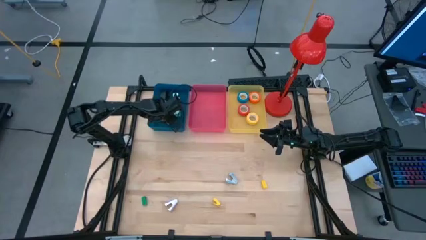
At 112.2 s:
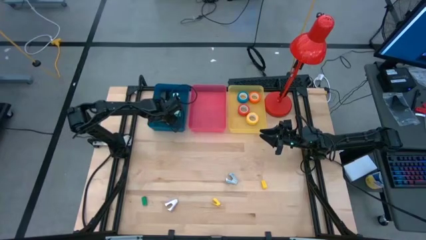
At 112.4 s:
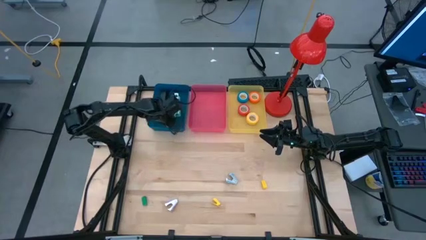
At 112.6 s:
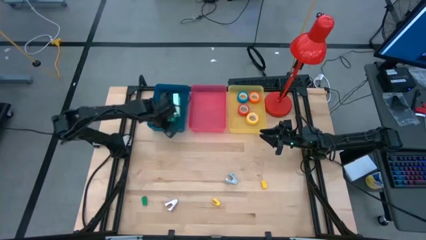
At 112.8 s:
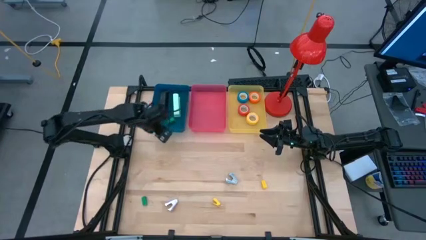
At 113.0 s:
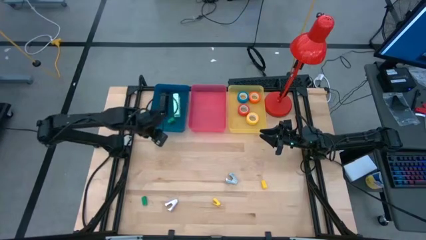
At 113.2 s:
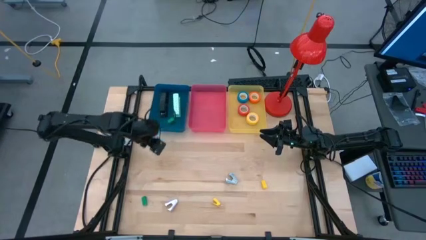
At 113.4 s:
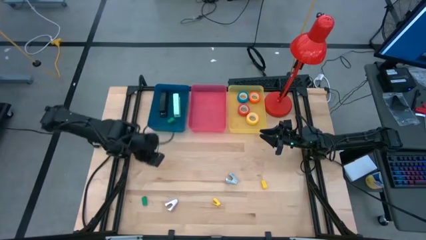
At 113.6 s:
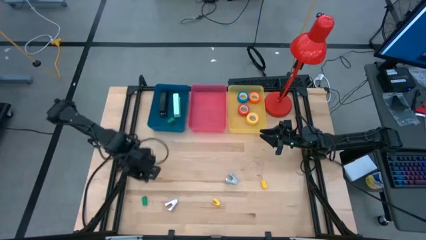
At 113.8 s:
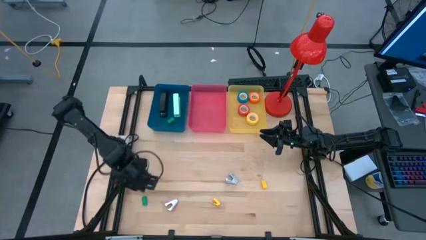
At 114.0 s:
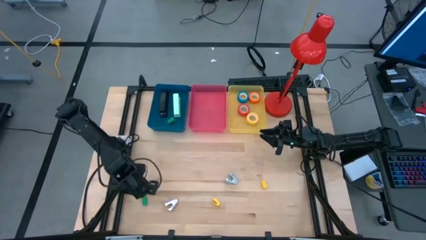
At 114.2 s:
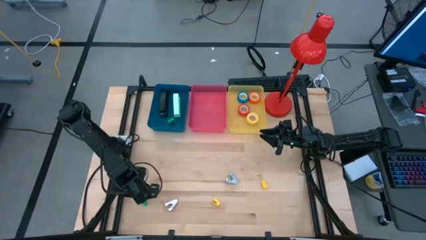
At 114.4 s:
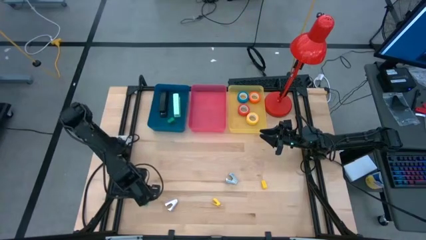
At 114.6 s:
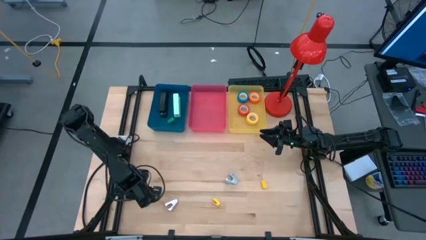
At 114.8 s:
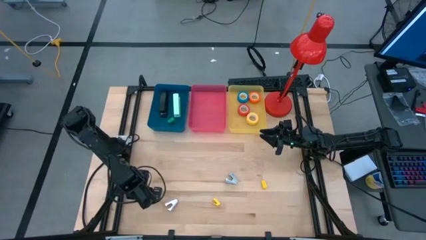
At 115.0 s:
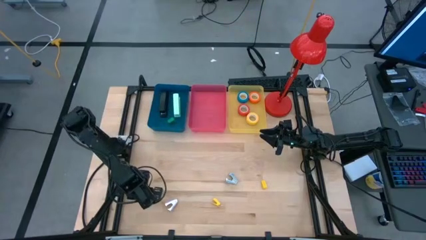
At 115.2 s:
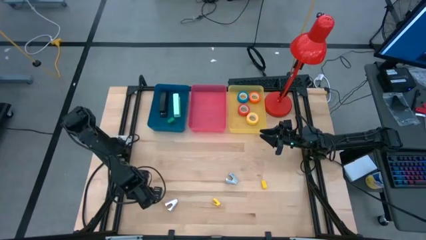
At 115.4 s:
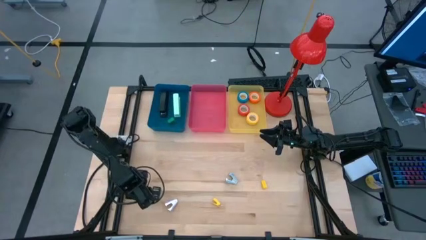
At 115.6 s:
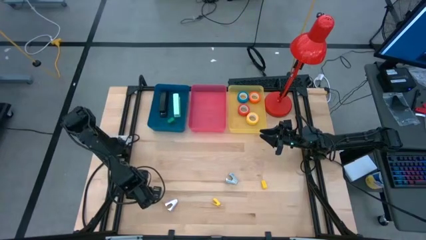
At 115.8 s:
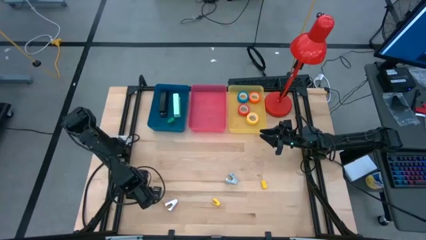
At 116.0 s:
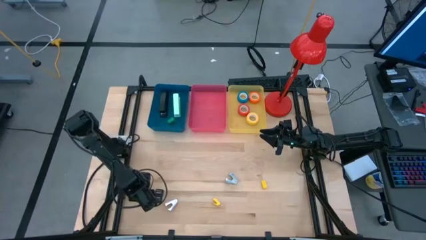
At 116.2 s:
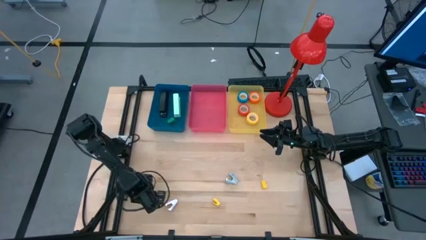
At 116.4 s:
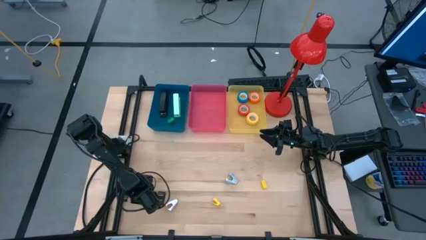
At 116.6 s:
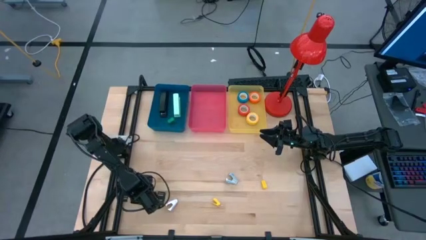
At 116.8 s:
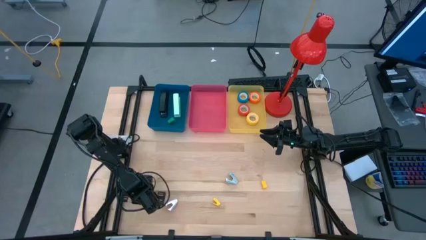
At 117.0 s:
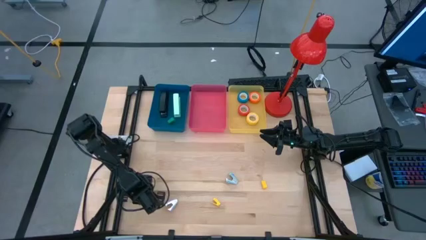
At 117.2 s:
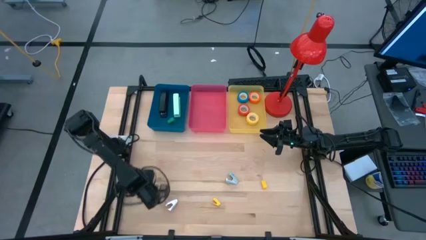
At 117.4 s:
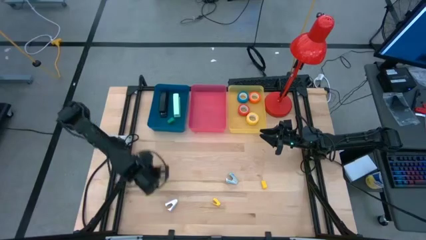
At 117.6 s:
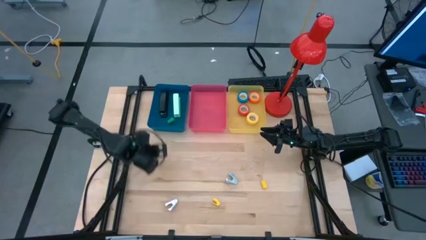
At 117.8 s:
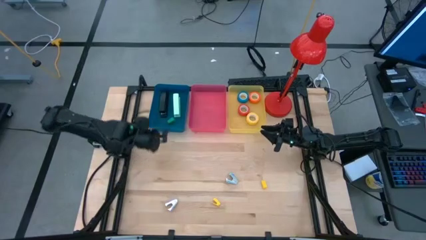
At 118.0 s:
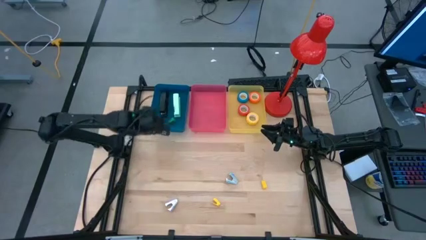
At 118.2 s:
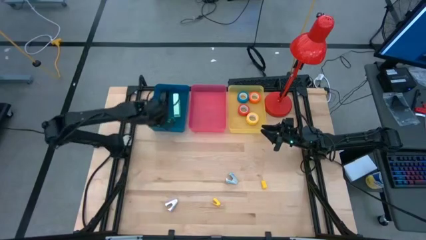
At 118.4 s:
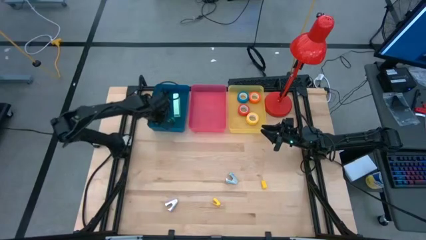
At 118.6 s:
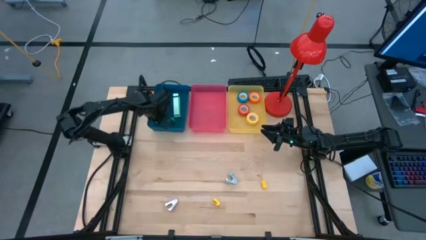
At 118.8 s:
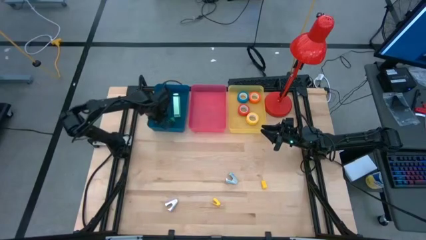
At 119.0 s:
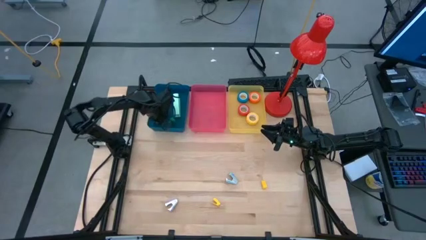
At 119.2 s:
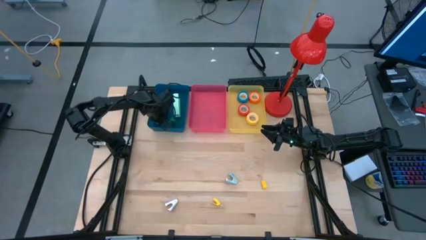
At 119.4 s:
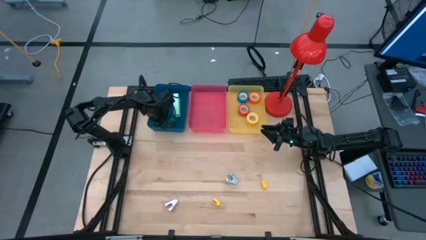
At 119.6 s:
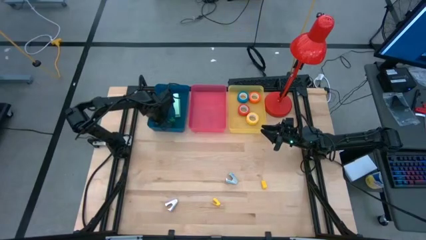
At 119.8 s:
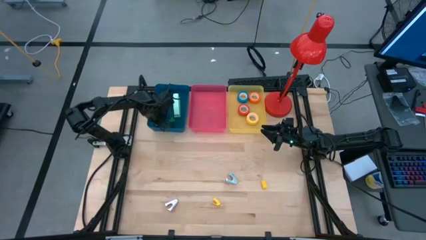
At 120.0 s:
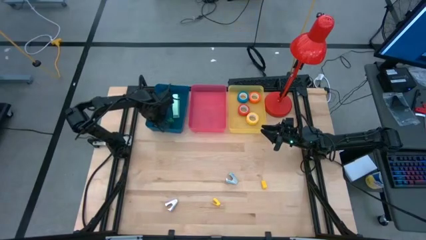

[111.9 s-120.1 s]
Task: Pick and place Stapler, Stapler remover, tape
Put the green stapler into the blue bin

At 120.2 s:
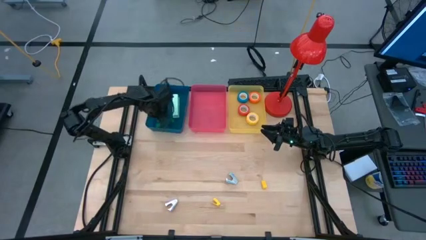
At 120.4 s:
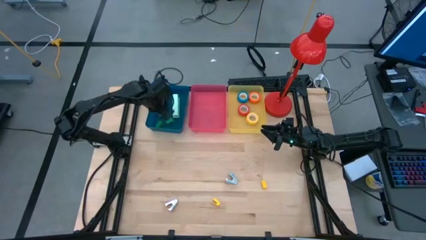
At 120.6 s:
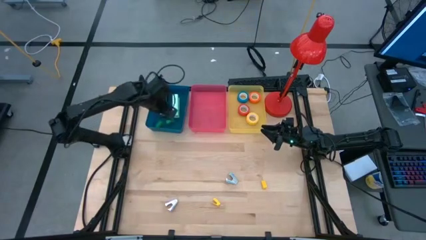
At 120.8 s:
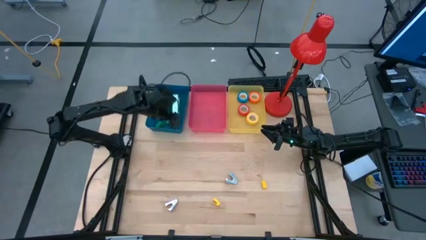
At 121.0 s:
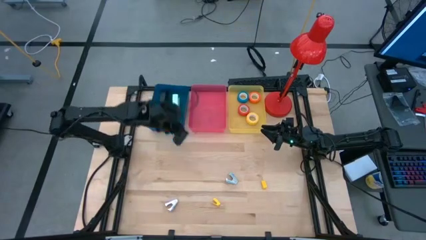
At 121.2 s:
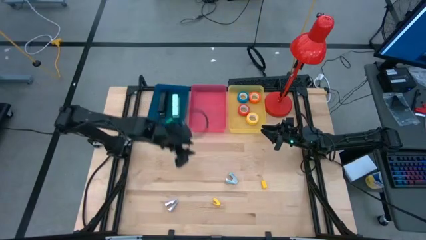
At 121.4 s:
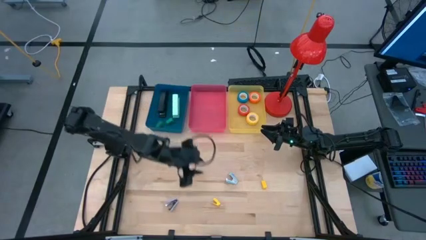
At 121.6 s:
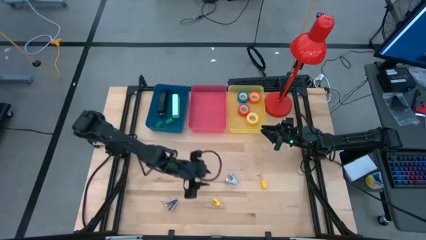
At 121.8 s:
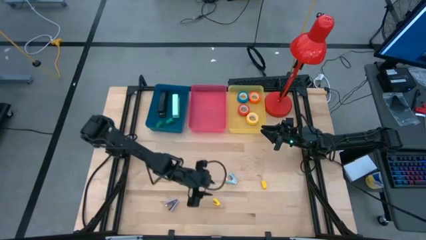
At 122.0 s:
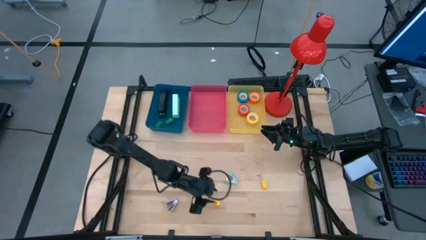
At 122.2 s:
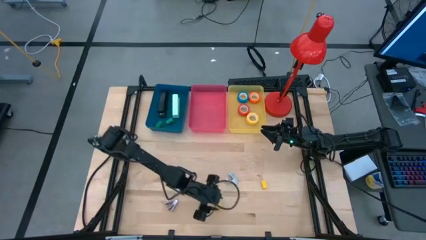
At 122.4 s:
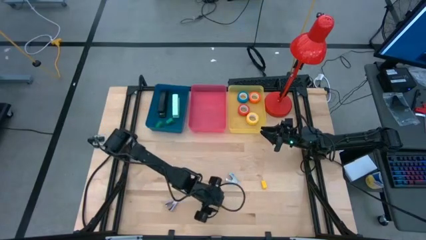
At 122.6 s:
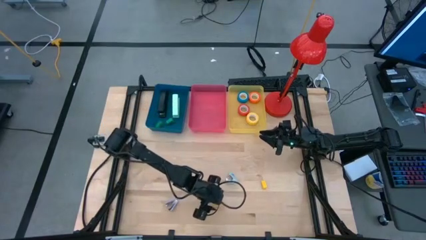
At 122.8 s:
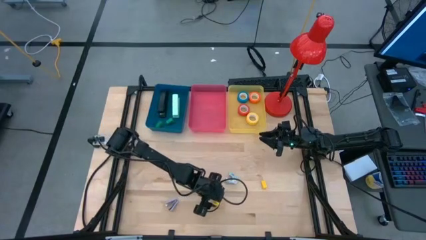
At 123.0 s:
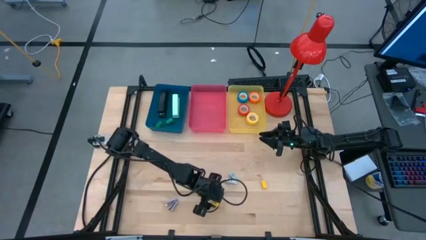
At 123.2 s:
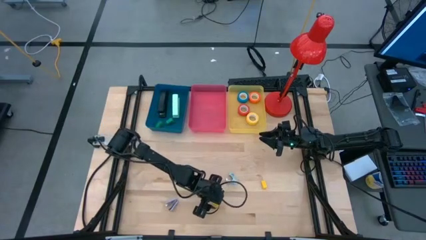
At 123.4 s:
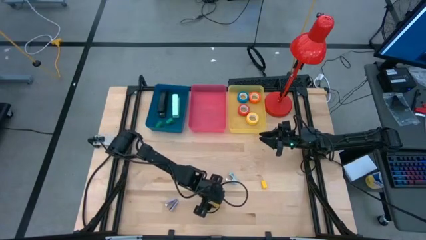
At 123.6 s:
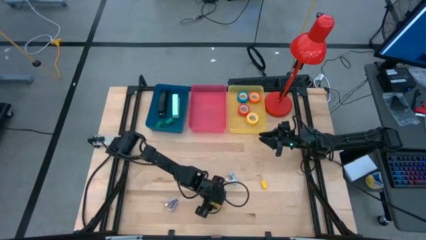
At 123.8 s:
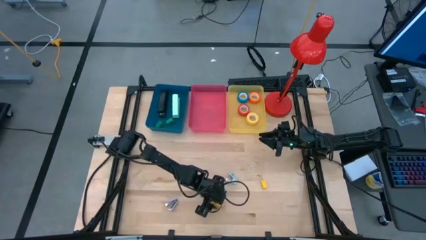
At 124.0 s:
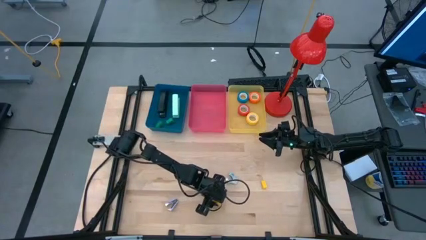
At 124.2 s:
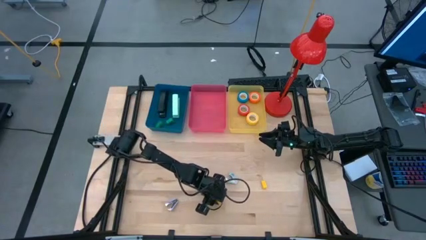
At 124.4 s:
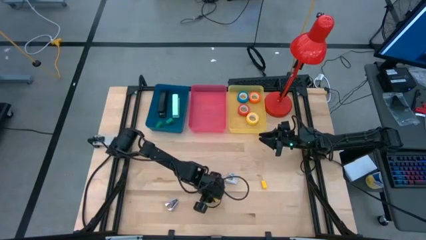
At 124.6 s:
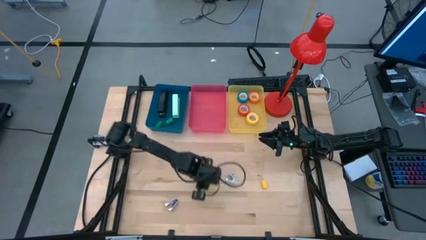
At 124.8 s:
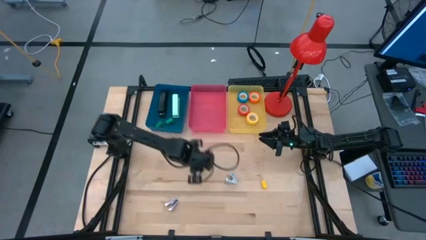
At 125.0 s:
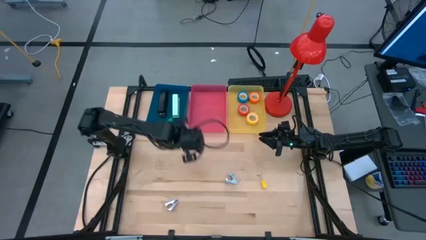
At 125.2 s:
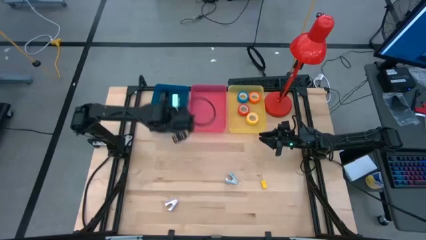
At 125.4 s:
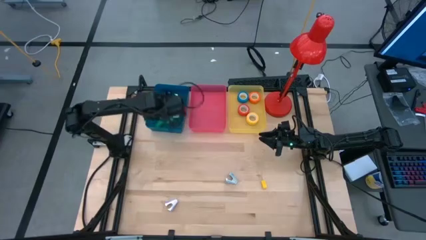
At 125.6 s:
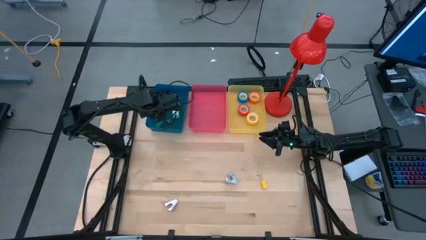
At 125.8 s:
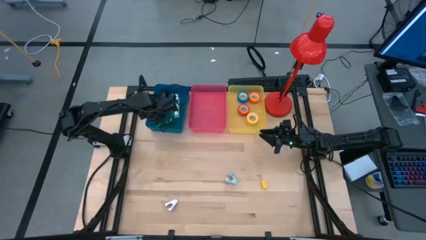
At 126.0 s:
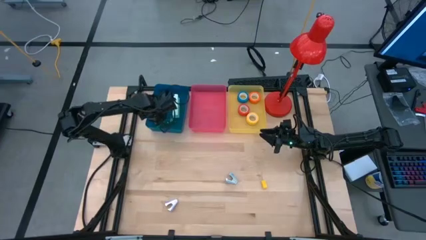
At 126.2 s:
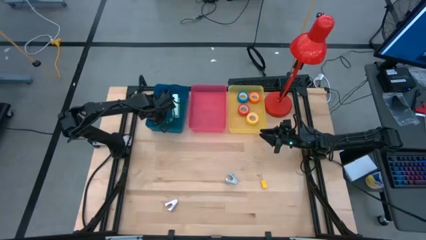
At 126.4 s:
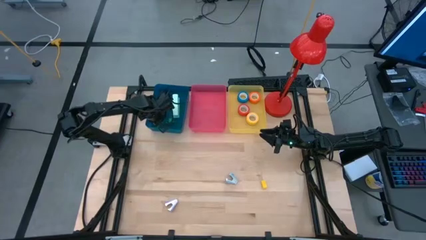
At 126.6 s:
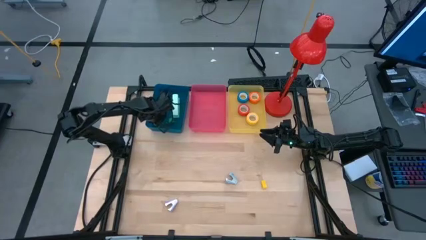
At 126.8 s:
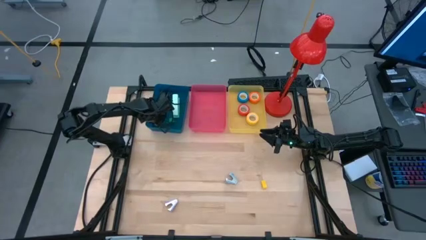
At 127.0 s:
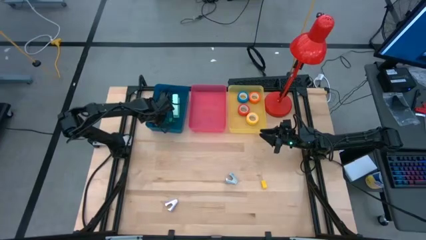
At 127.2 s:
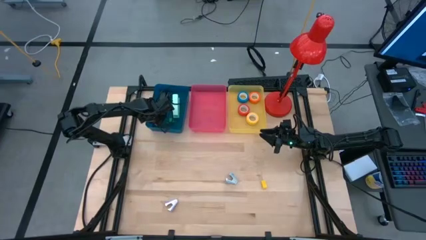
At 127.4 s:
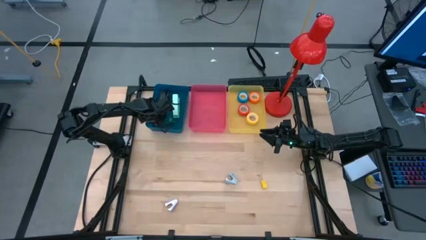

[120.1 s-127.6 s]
Put the bottom yellow stapler into the blue bin
